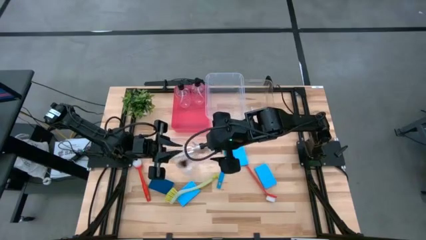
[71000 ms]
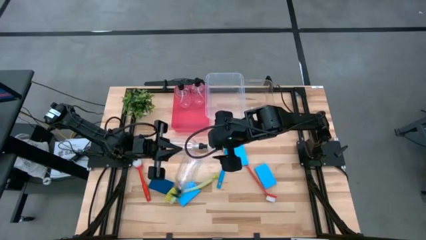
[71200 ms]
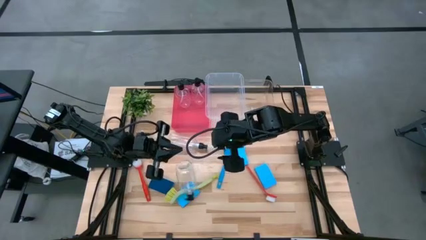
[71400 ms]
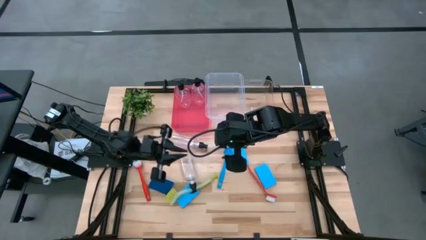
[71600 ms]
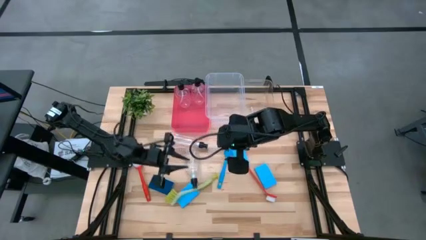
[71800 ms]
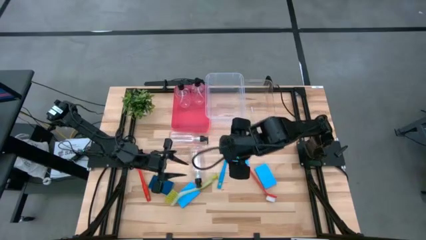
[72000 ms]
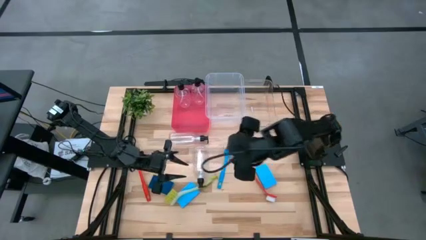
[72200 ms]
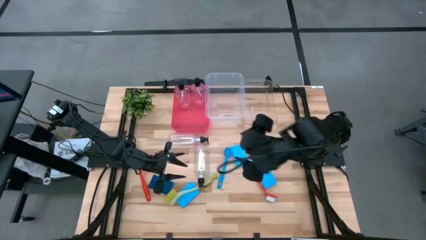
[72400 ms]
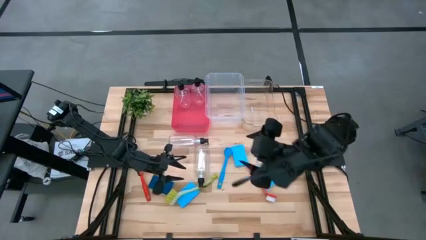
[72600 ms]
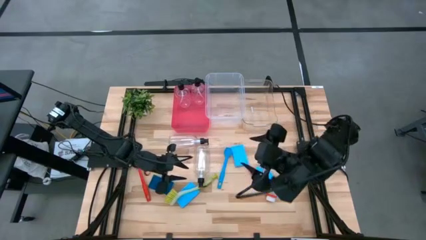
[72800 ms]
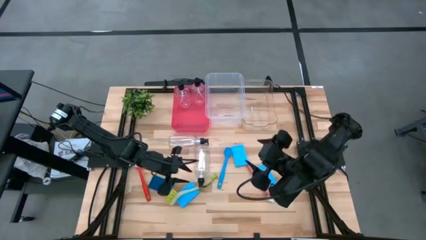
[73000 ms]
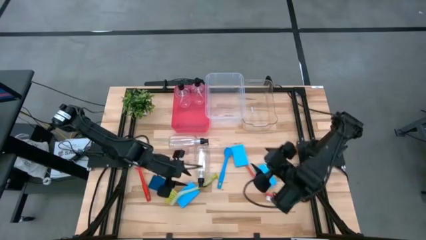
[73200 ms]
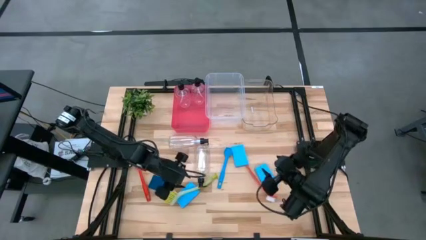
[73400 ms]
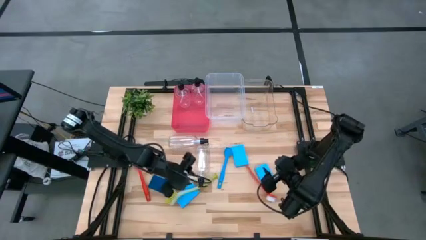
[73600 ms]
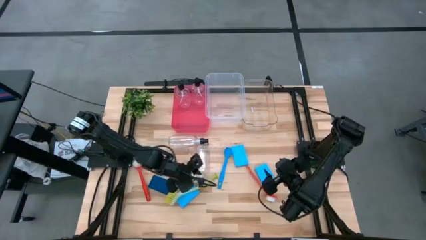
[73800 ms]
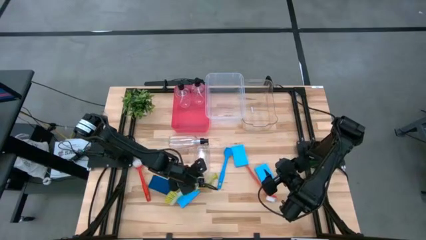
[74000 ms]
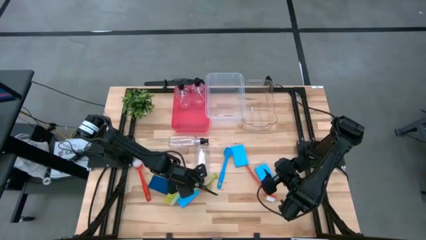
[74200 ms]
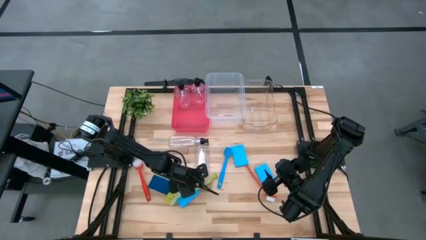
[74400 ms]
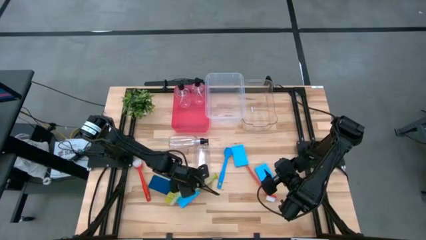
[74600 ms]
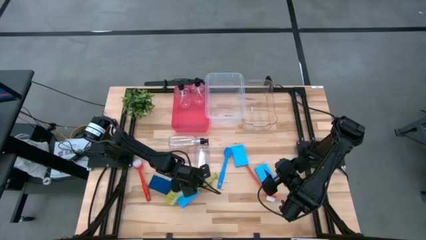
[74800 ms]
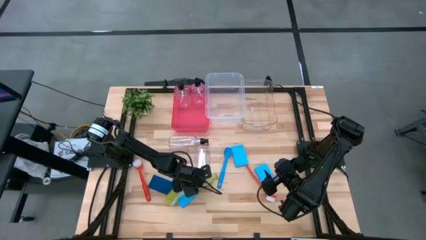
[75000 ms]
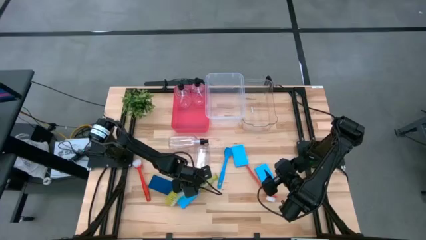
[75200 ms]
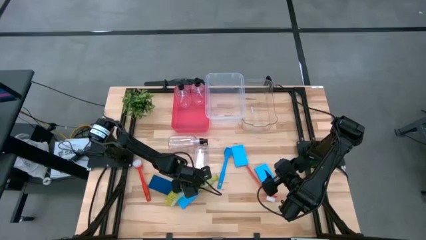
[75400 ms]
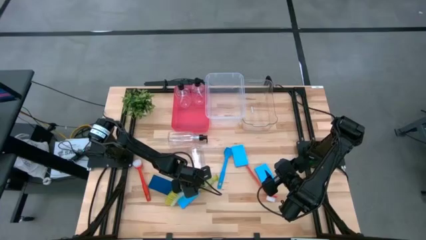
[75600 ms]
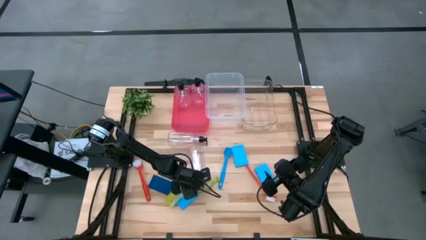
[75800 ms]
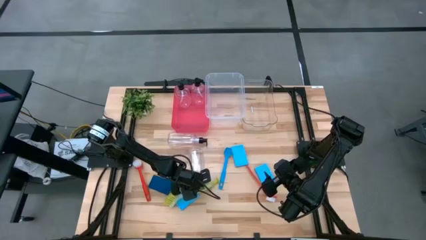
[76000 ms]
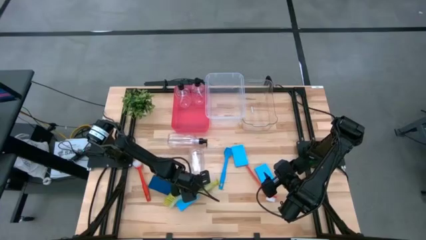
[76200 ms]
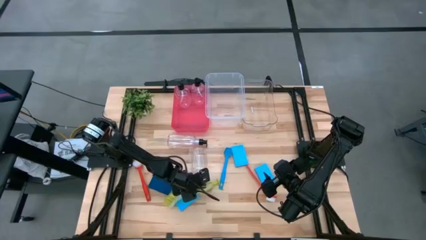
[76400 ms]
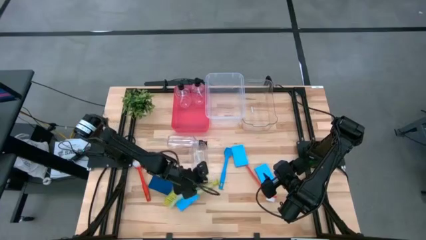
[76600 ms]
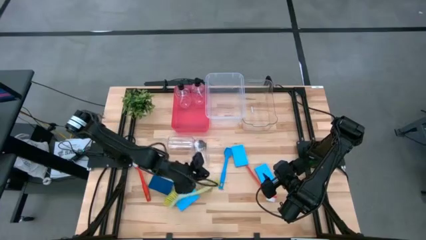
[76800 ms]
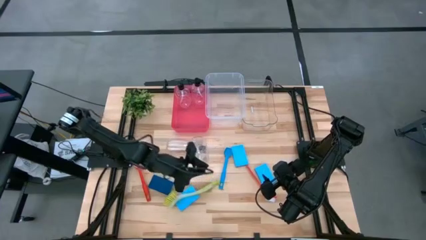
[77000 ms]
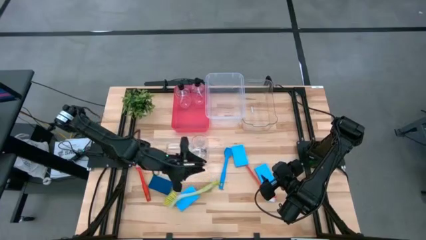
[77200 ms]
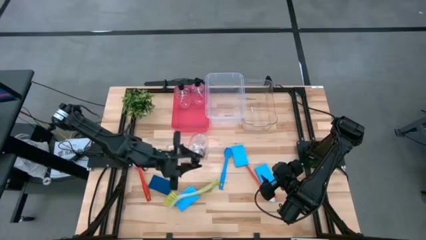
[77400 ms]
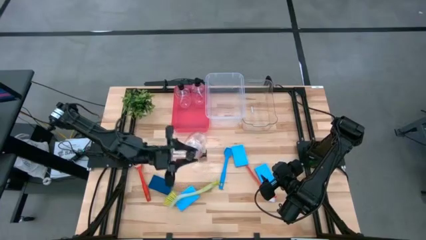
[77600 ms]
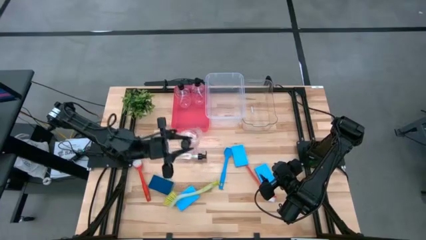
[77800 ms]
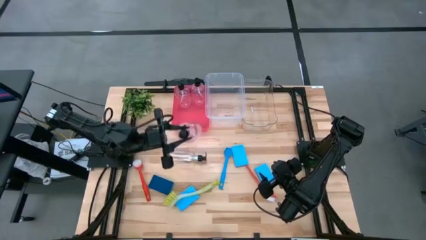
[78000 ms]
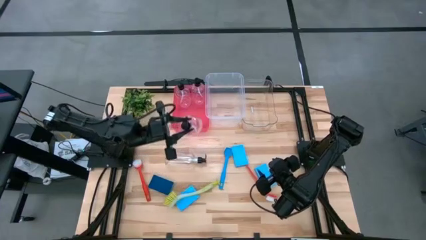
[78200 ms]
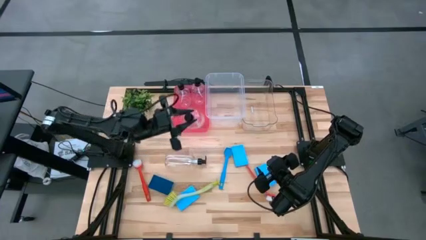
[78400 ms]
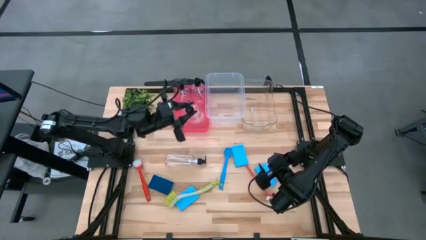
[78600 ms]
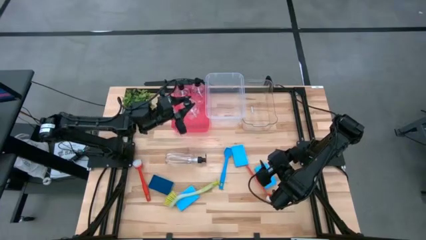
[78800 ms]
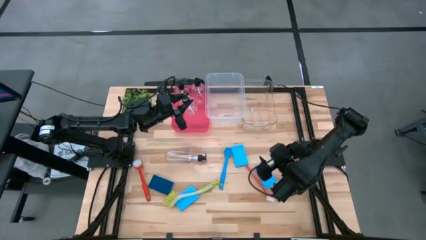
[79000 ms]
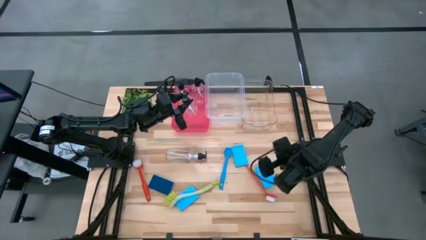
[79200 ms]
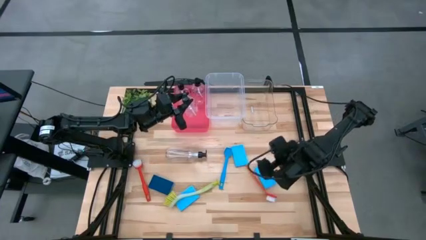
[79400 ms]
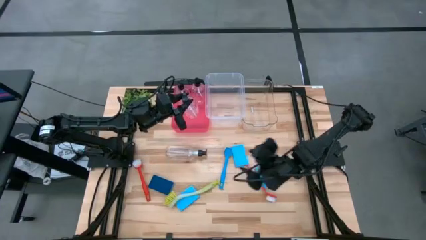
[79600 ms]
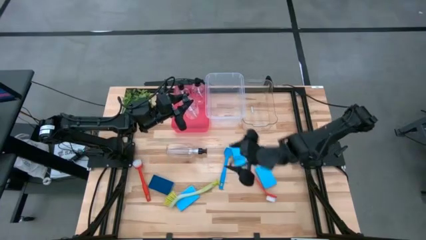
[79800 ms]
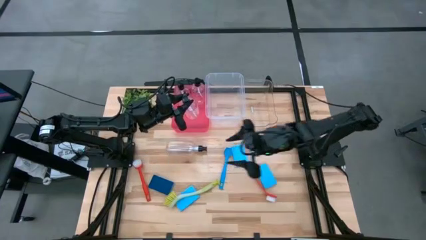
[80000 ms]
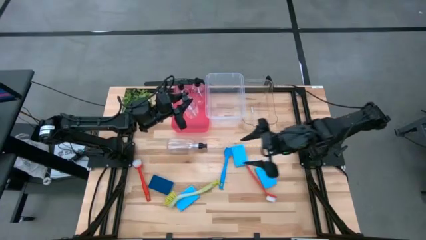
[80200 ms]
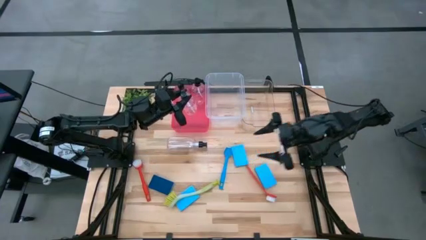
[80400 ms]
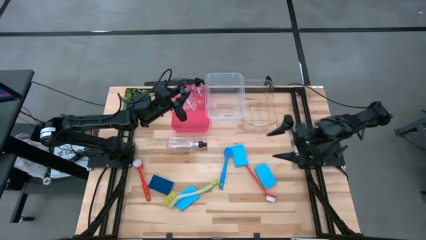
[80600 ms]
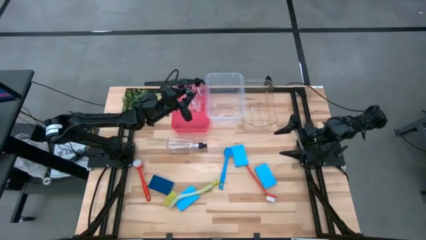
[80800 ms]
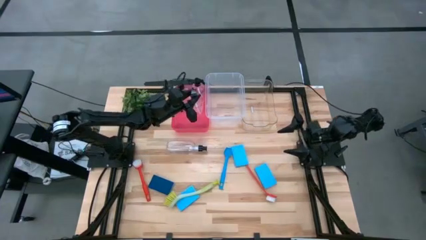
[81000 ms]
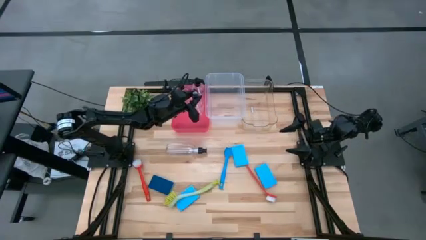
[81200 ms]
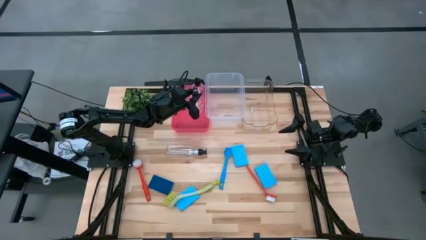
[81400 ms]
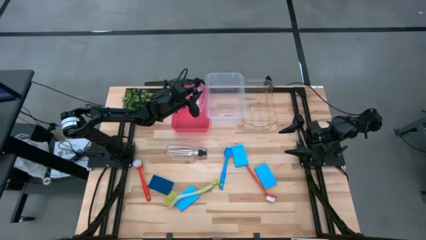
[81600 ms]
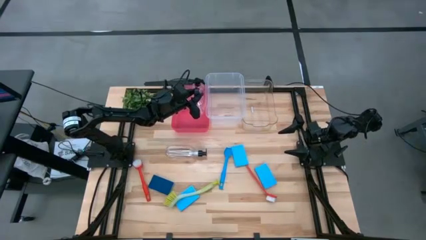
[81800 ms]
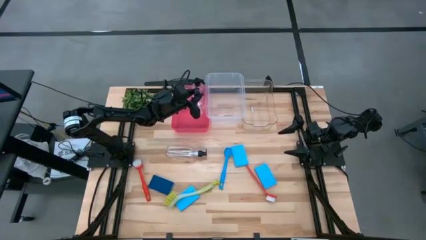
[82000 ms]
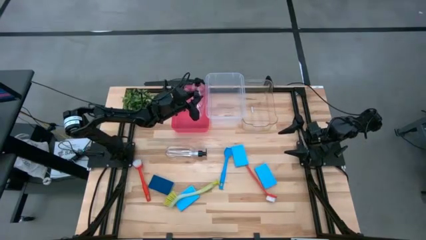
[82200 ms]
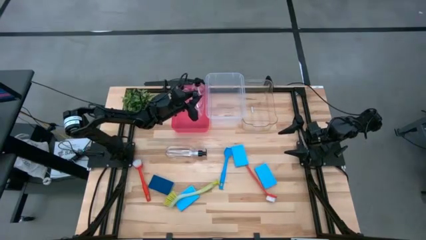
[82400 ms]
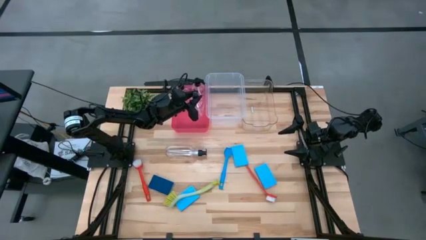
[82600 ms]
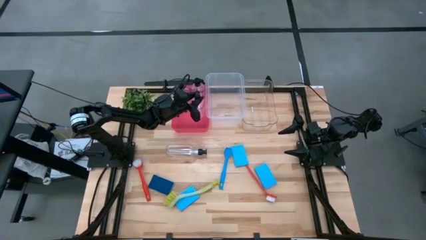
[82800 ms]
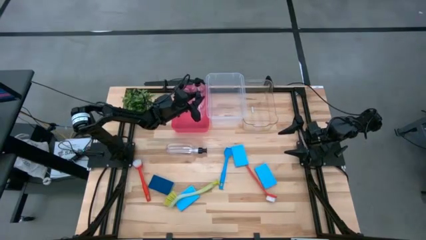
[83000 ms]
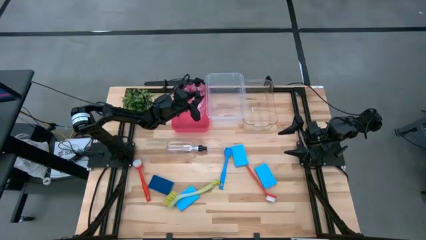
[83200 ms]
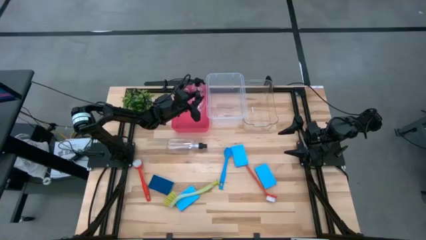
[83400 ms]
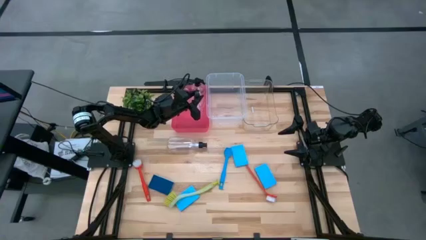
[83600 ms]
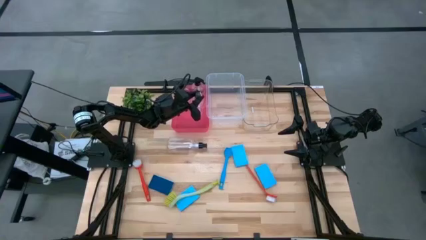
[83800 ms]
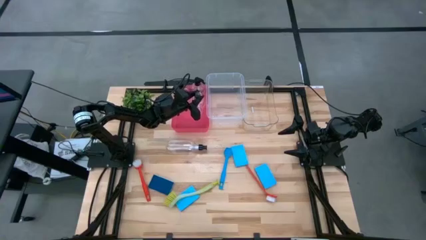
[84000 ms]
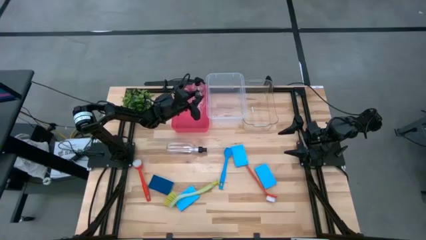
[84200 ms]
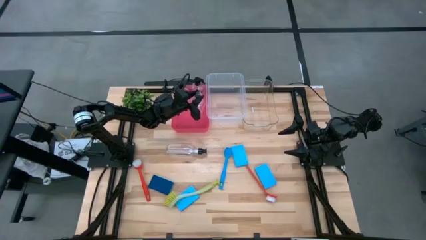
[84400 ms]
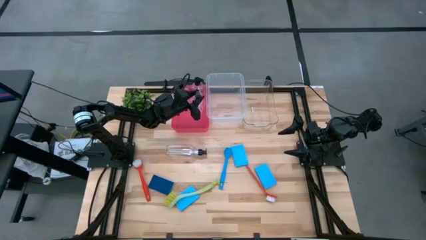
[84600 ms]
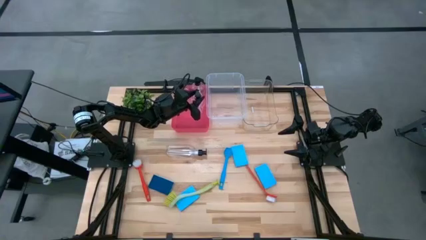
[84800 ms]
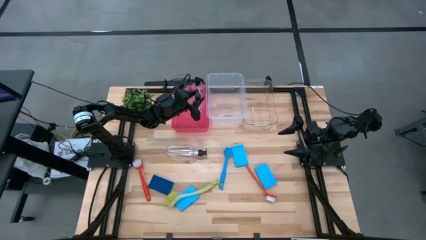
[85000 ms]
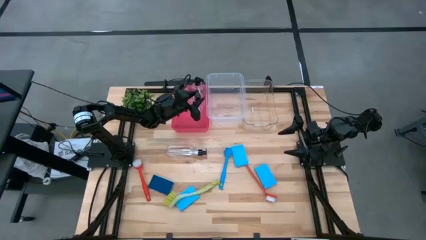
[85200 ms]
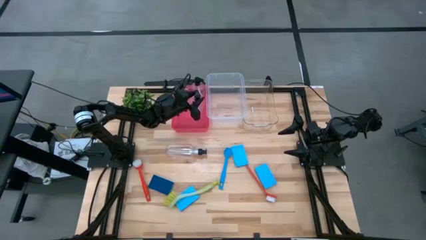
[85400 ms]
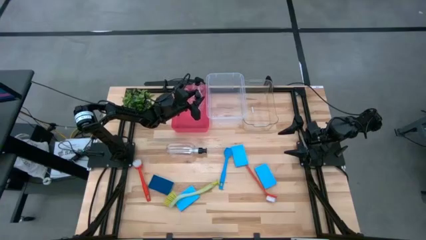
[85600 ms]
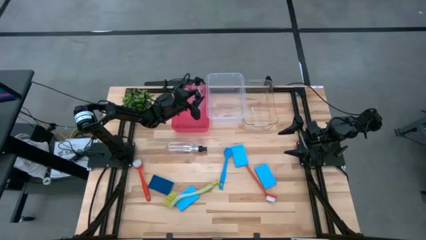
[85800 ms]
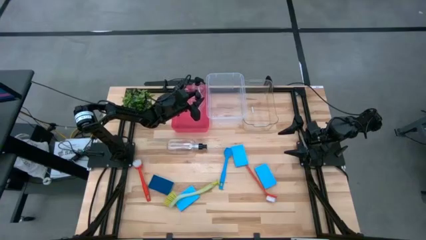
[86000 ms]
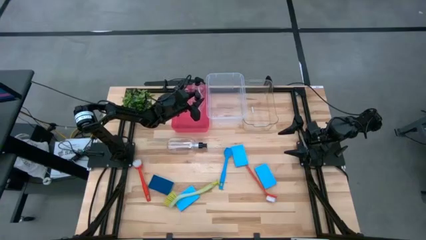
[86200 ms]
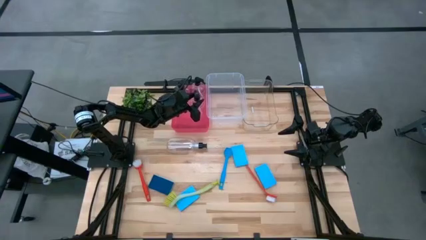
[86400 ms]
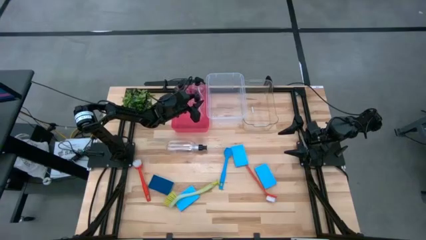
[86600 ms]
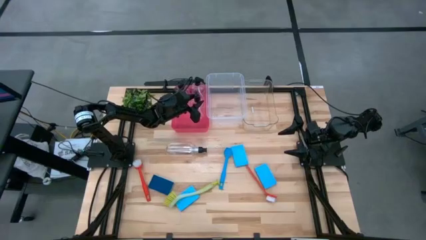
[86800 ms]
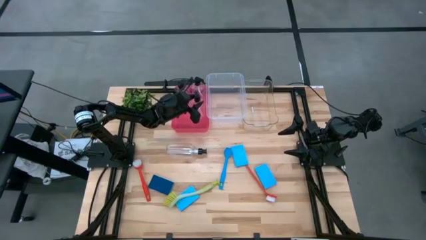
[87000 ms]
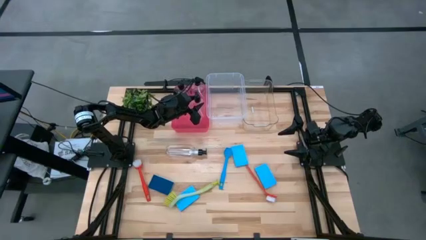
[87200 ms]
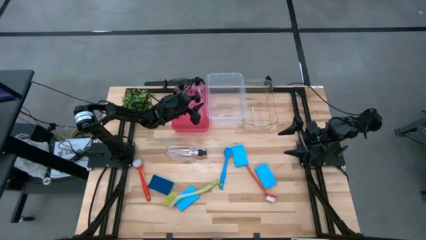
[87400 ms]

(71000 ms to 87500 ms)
Task: Pick & Place Kitchen Sink Supplies
Put the bottom left transparent dishwashing liquid dispenser into the red bin
